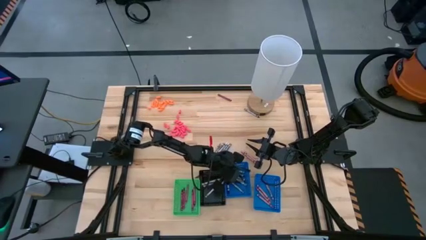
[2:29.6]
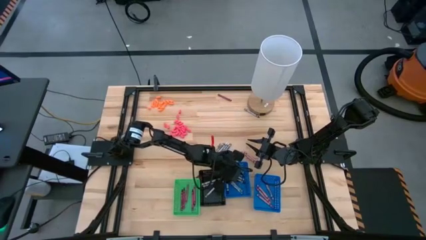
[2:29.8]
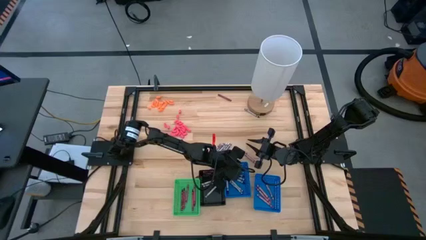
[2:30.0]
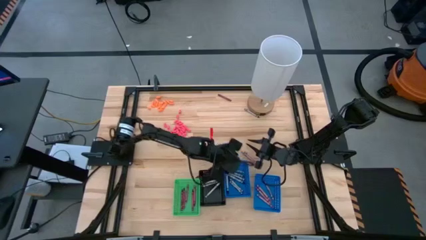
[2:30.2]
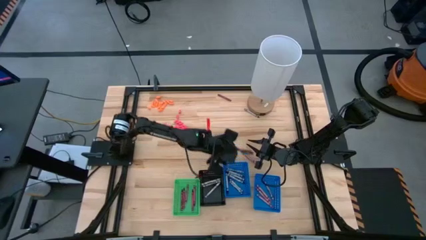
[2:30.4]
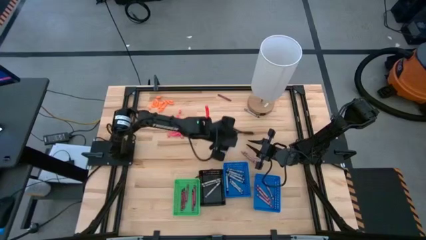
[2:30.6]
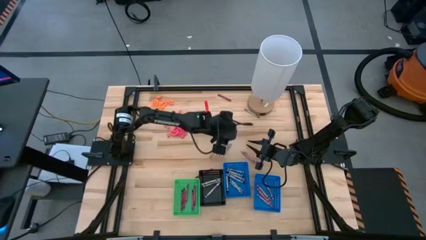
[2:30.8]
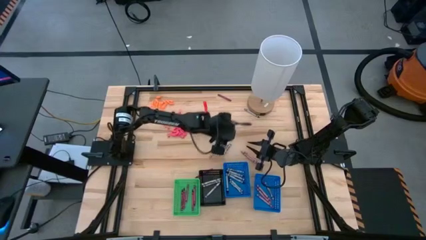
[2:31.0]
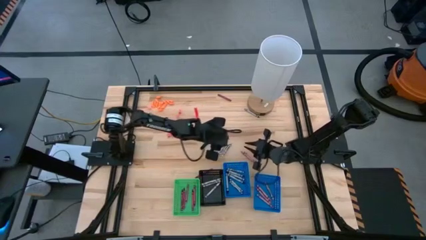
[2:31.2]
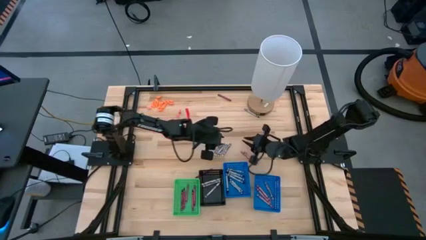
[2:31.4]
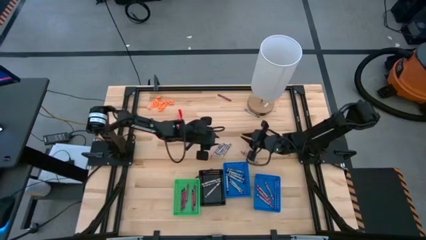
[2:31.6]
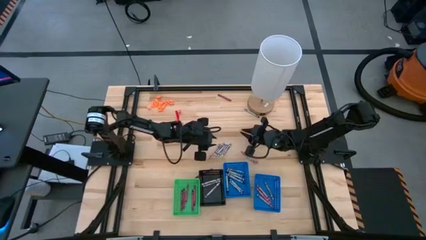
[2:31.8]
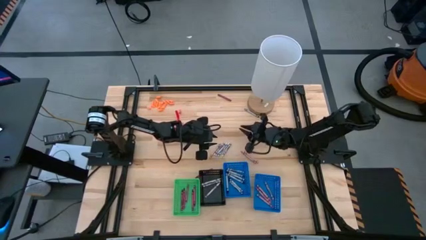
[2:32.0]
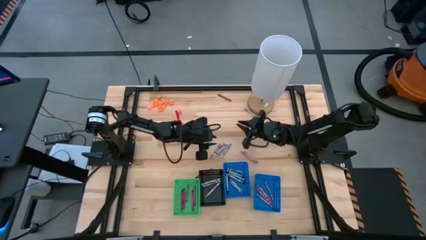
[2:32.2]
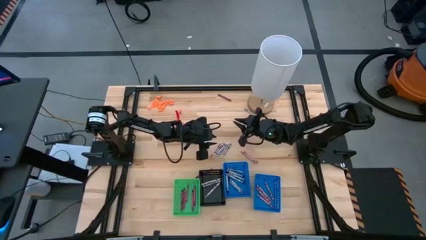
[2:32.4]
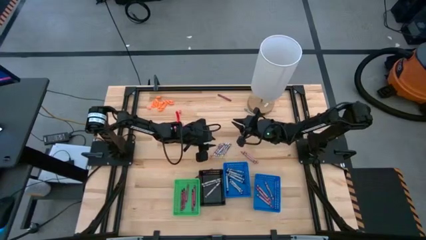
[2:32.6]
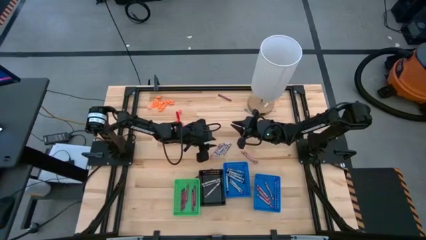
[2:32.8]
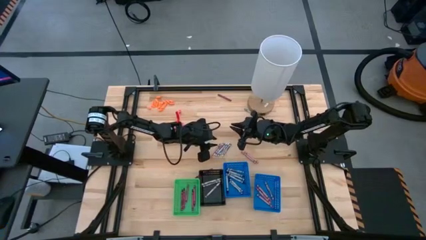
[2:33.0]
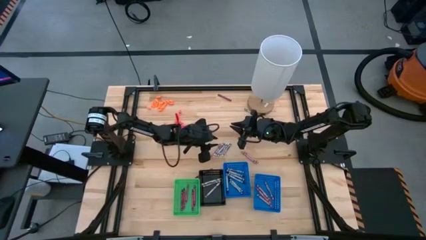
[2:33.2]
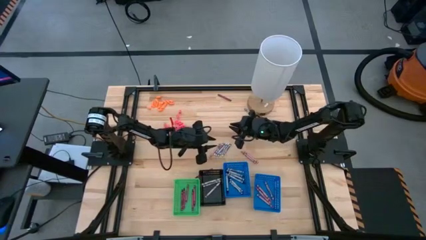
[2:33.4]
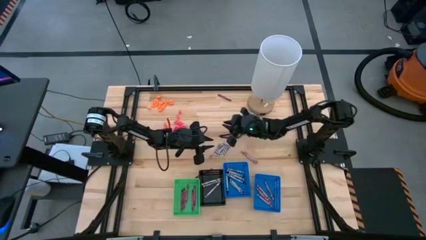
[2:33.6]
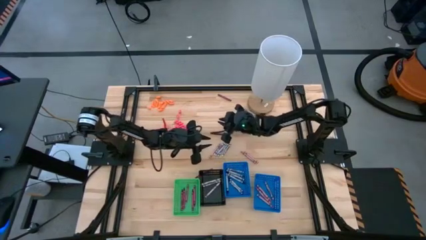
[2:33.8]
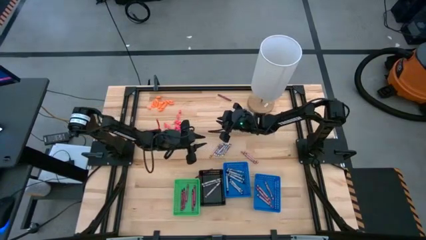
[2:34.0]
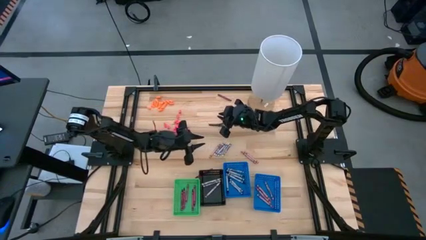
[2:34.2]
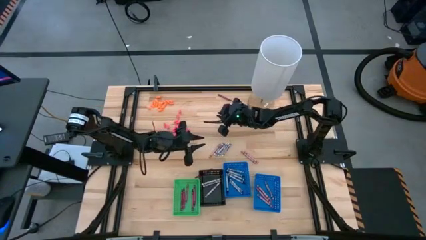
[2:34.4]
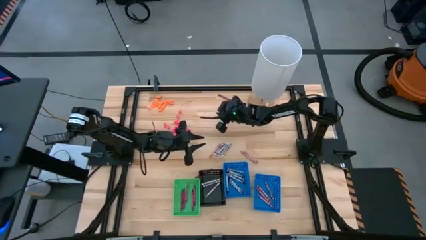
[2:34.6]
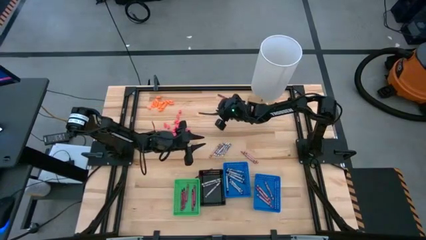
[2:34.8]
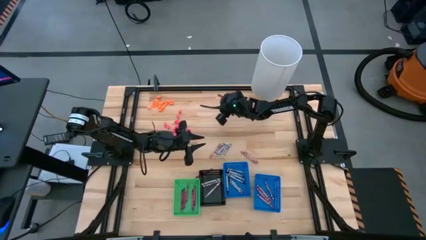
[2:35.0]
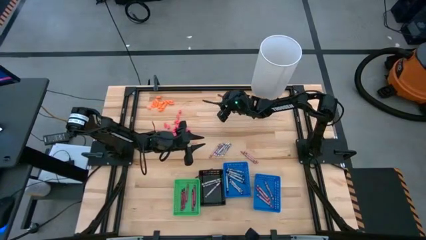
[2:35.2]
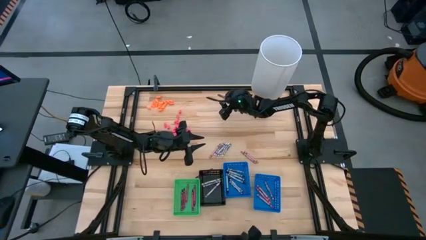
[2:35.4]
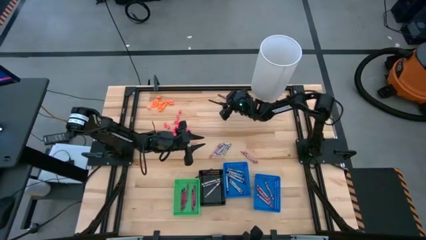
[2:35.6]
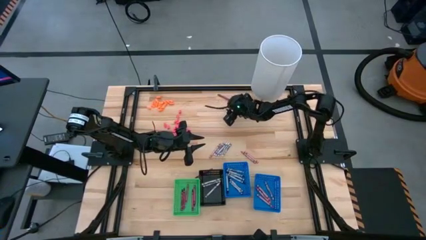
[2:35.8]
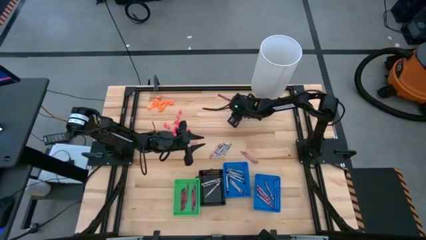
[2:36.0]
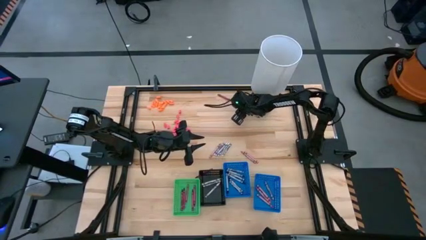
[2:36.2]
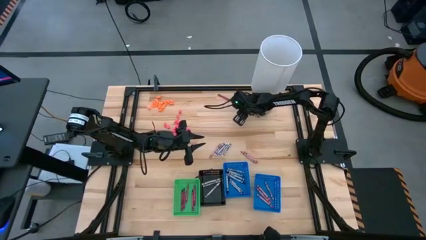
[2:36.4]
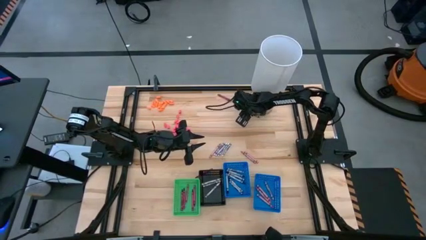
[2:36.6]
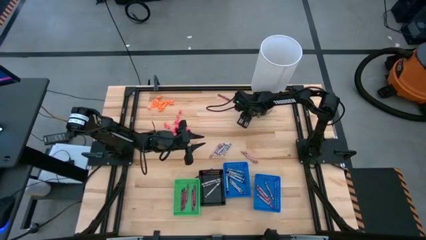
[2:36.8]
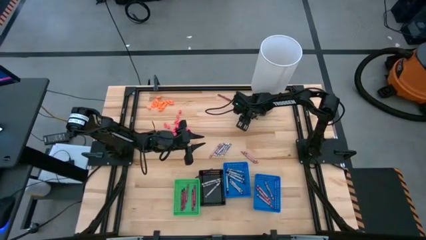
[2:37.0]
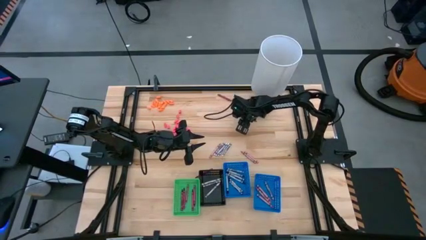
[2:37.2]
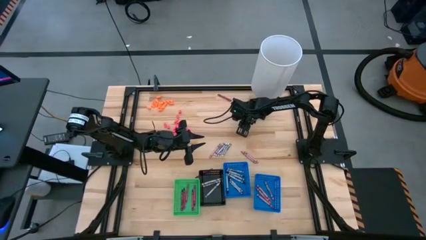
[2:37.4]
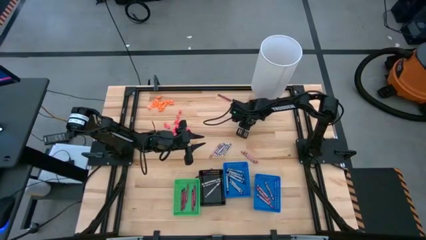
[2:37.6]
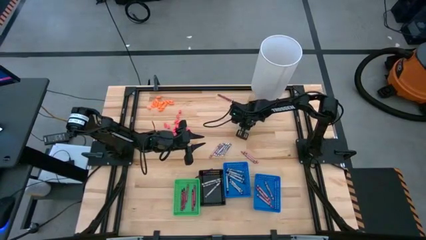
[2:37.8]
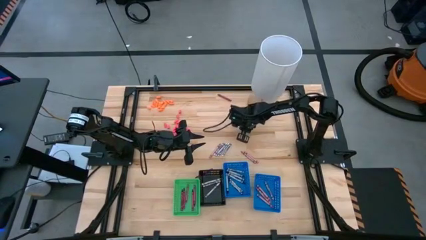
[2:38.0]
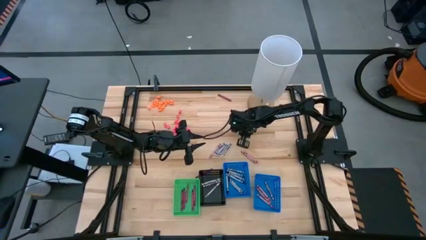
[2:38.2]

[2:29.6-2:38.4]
Task: Sort crayons
Put the black crayon into the left blue bin

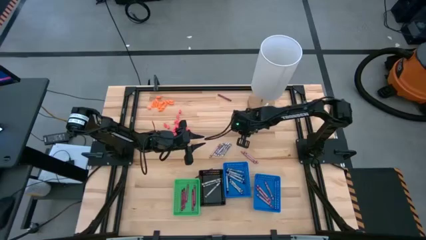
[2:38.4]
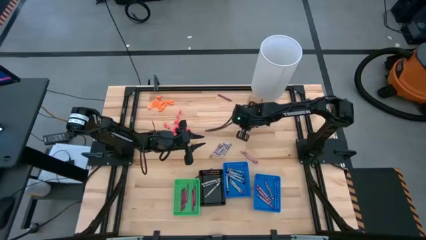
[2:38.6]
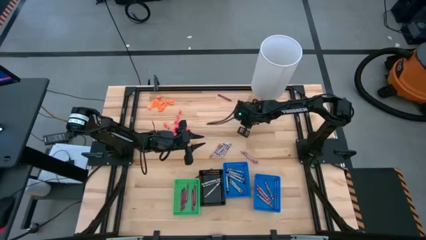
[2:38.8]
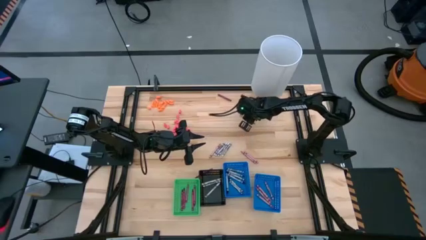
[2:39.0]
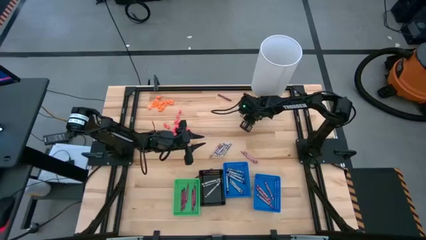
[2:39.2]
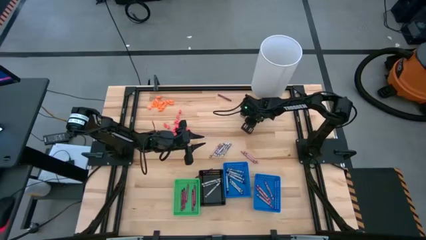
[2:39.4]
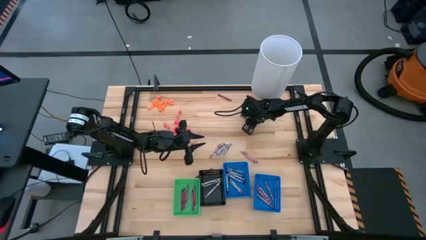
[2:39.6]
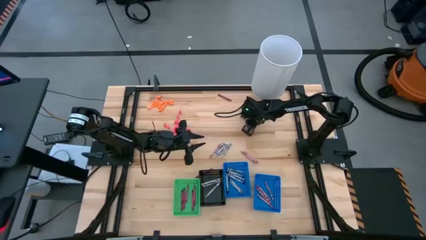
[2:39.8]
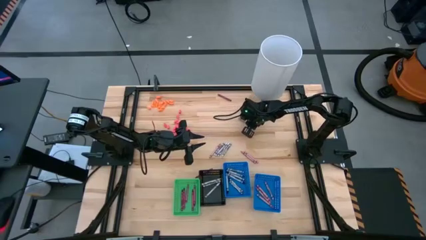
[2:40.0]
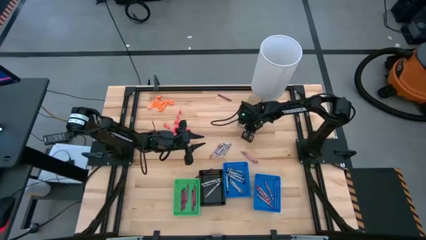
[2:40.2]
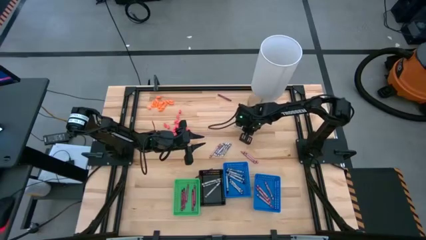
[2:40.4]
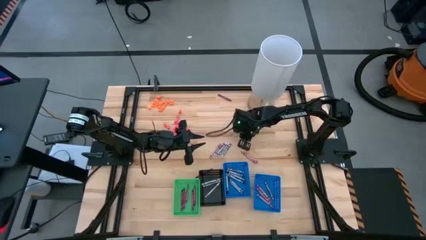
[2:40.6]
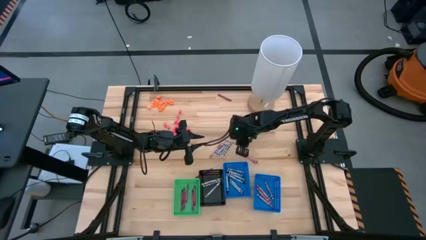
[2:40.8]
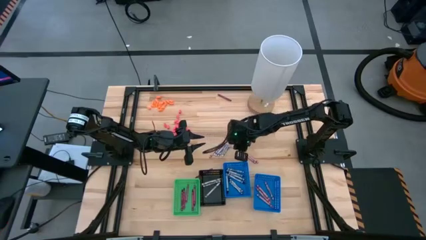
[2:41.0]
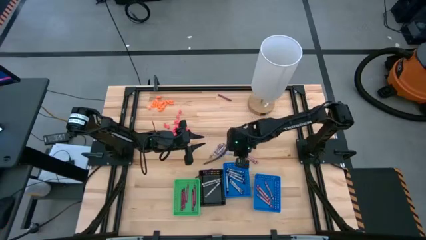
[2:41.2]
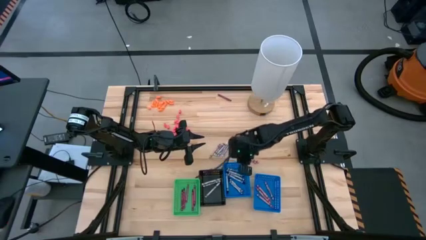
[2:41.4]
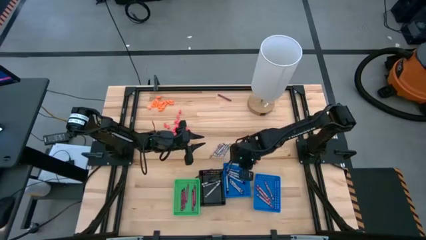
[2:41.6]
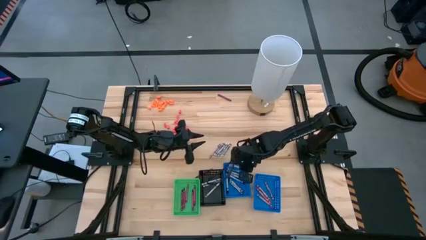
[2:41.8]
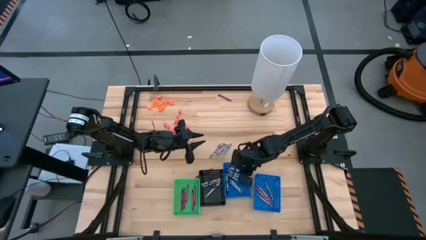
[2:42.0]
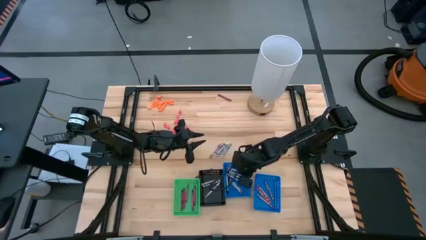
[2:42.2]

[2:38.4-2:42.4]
Put the black crayon into the left blue bin
